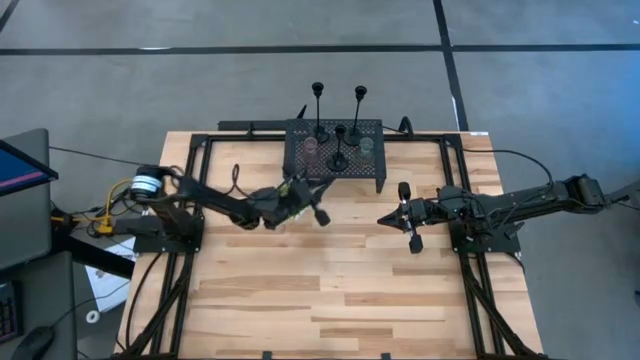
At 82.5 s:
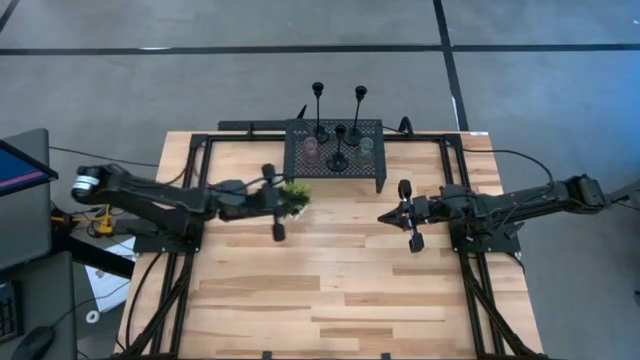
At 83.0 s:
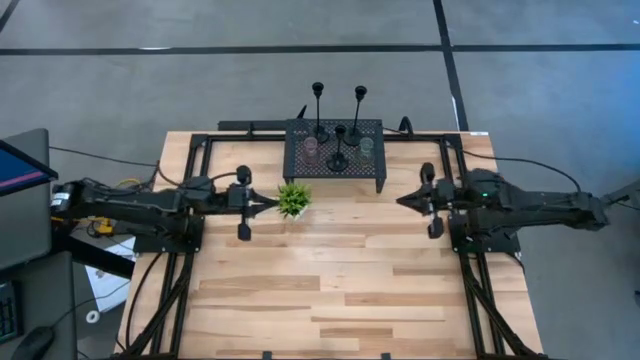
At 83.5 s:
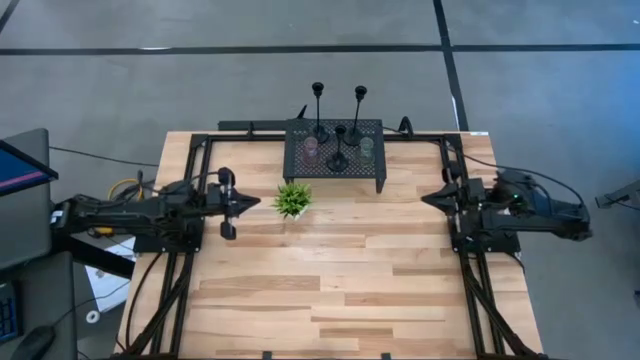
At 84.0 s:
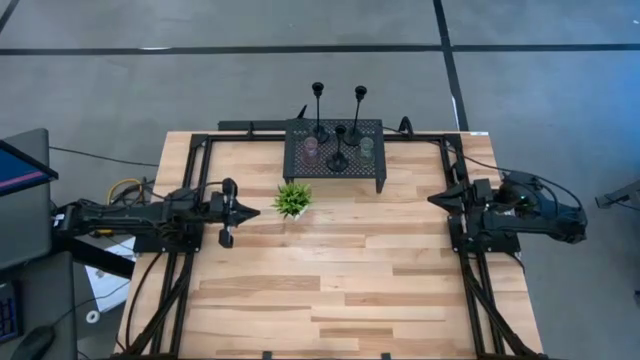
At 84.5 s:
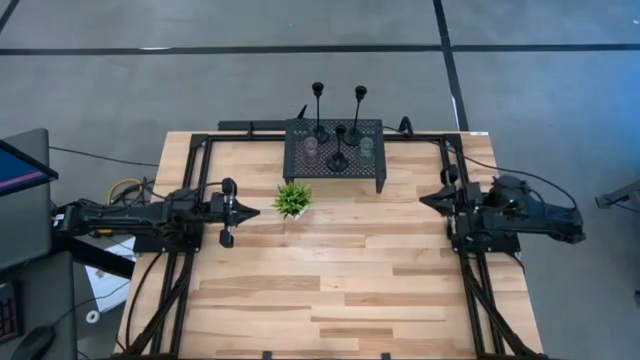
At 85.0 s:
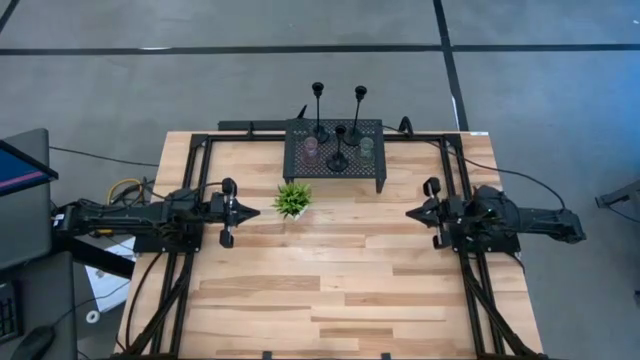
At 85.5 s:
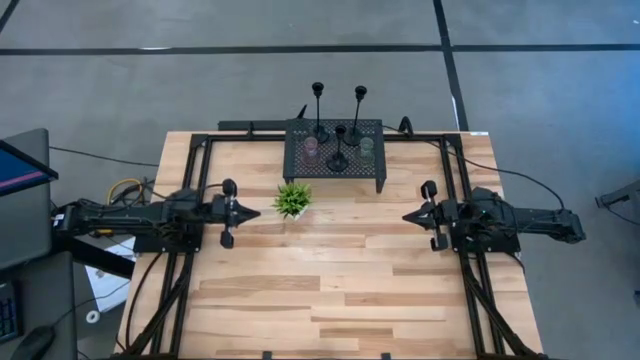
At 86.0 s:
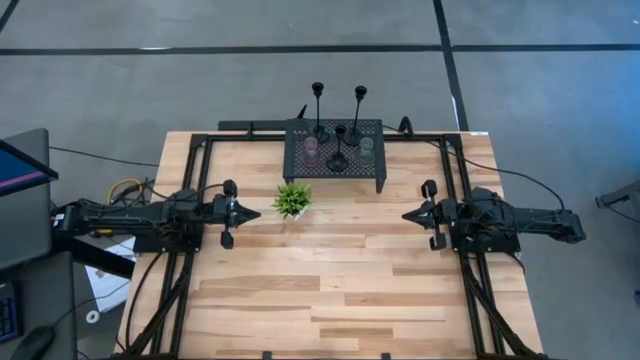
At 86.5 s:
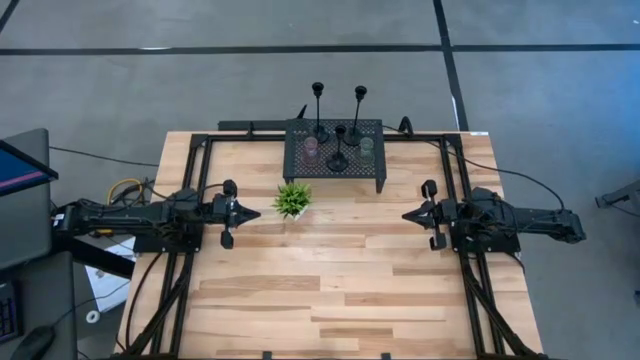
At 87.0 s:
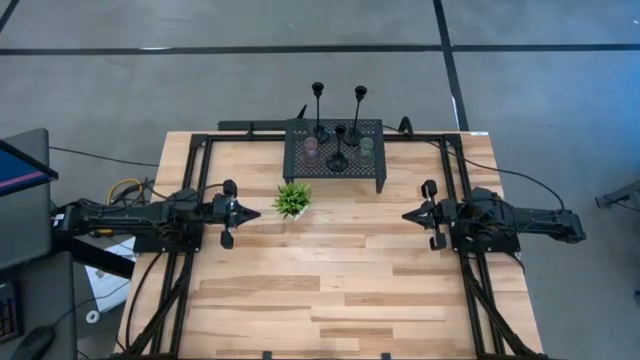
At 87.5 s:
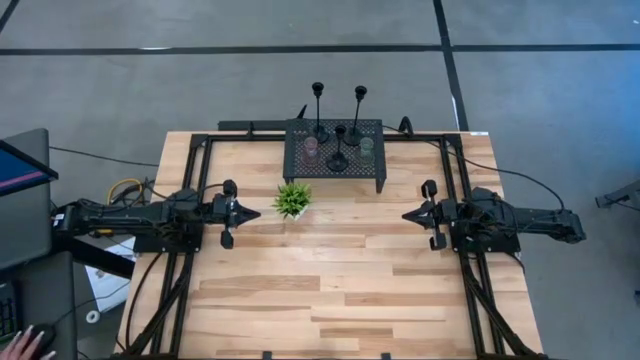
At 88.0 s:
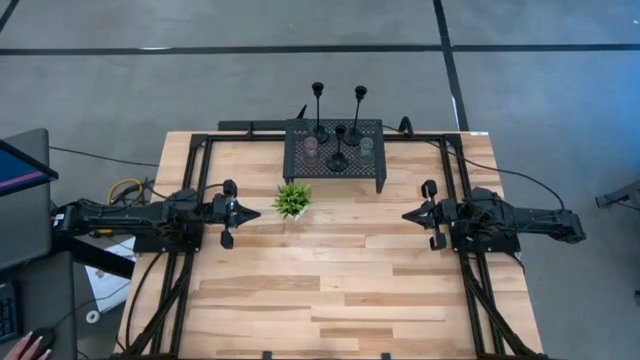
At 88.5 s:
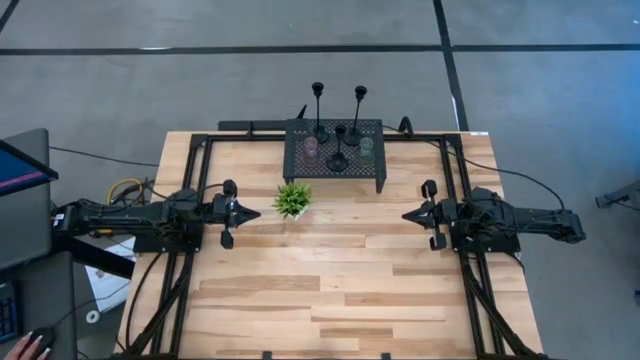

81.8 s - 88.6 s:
Task: Pick & Place candle stick holders
Return to Home Position

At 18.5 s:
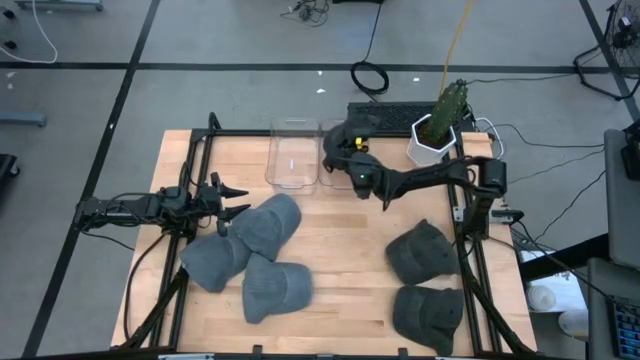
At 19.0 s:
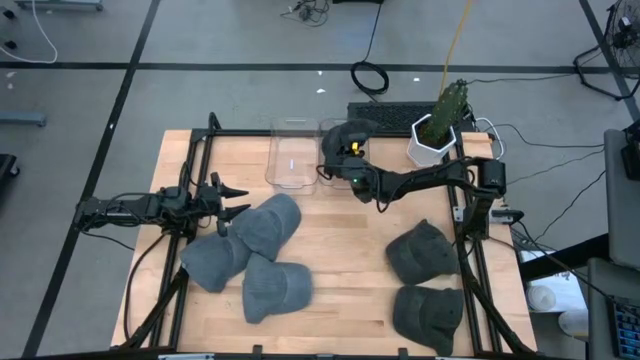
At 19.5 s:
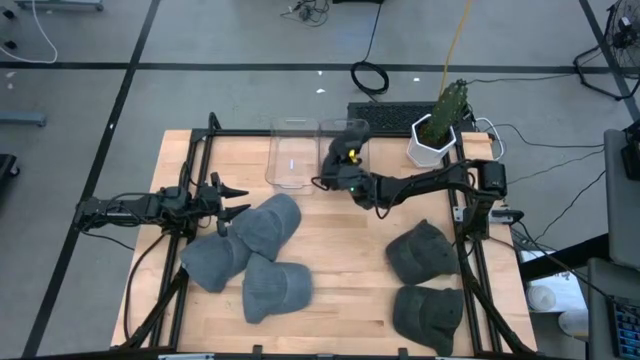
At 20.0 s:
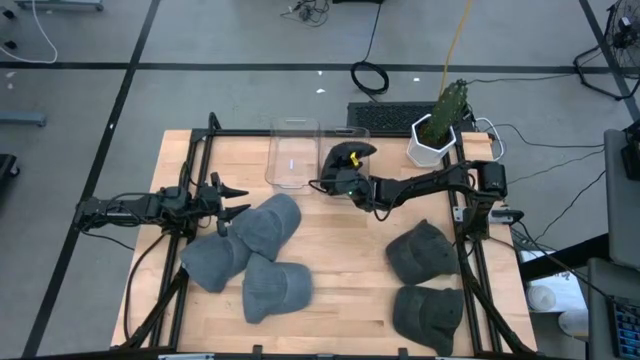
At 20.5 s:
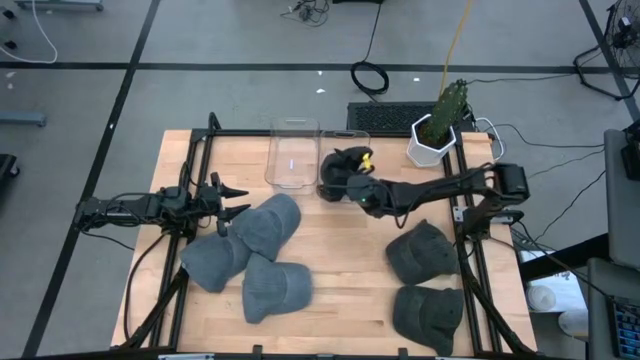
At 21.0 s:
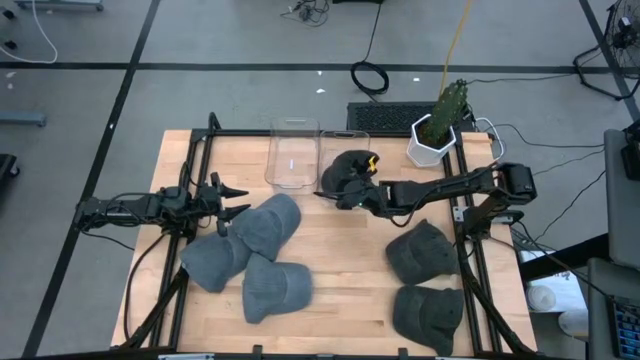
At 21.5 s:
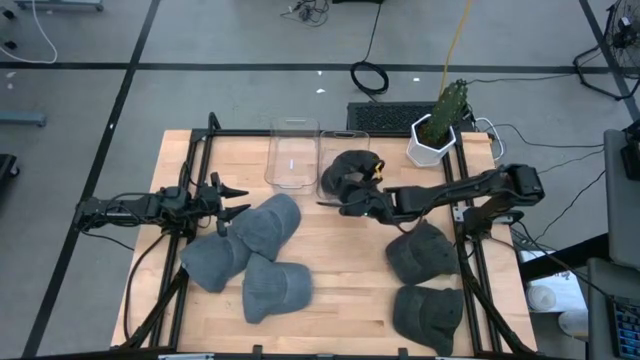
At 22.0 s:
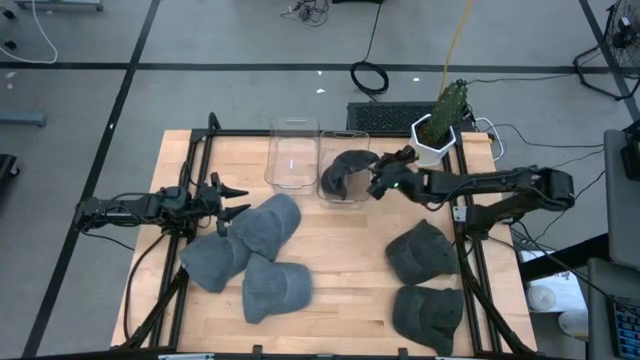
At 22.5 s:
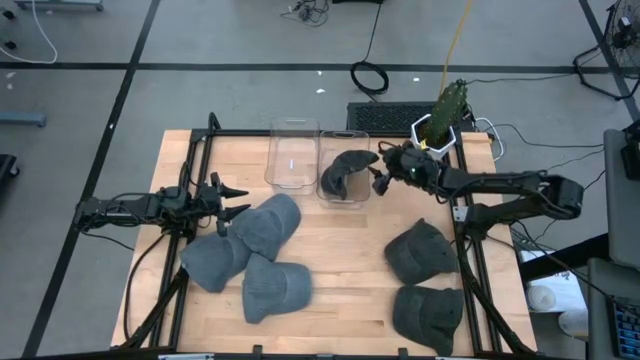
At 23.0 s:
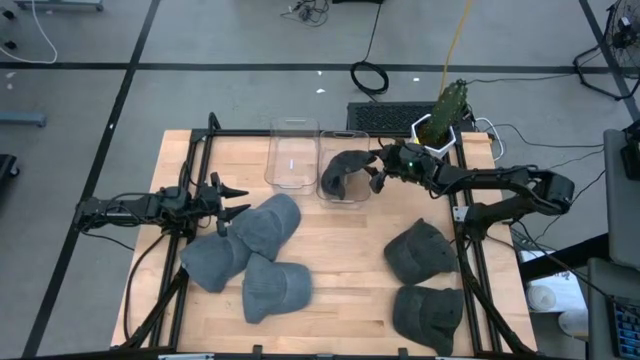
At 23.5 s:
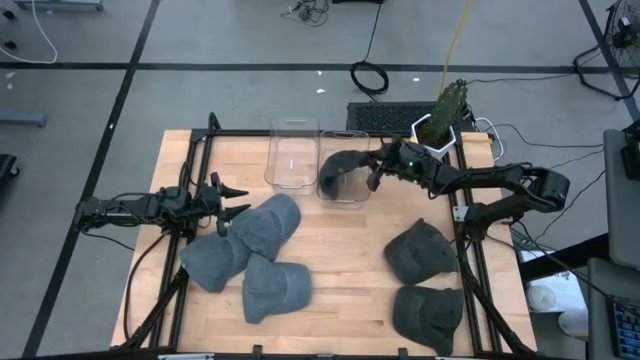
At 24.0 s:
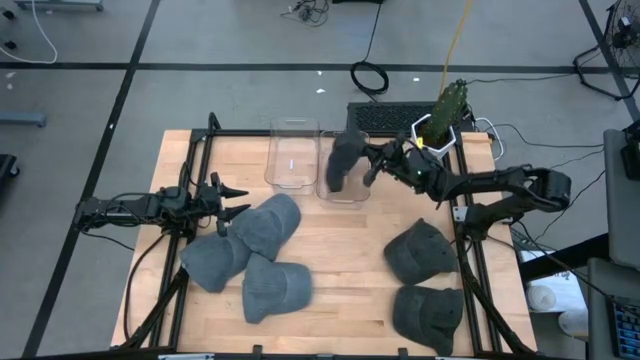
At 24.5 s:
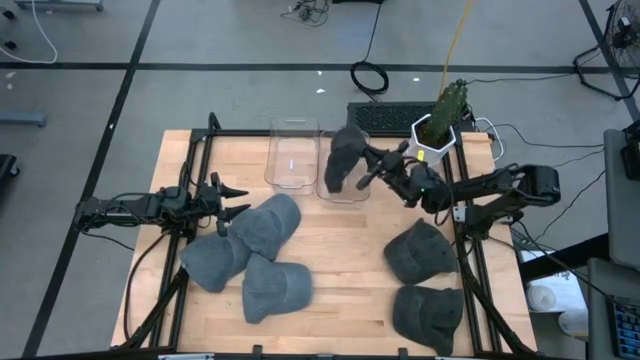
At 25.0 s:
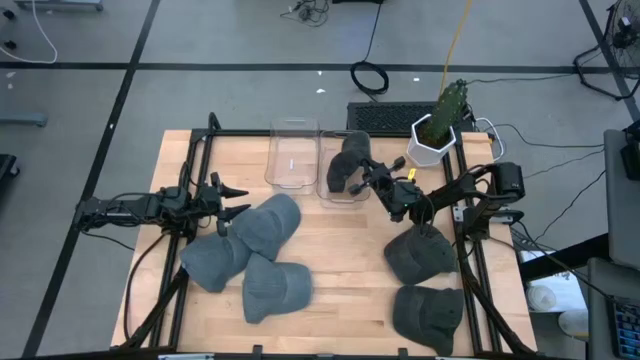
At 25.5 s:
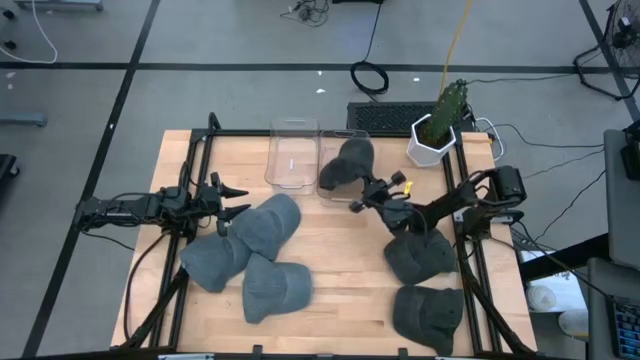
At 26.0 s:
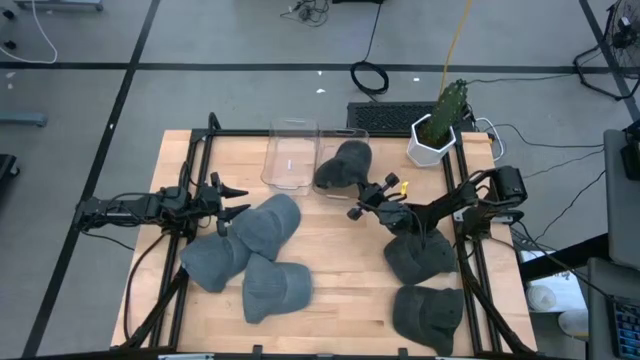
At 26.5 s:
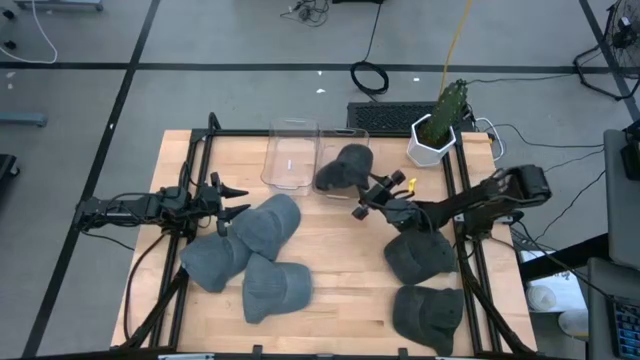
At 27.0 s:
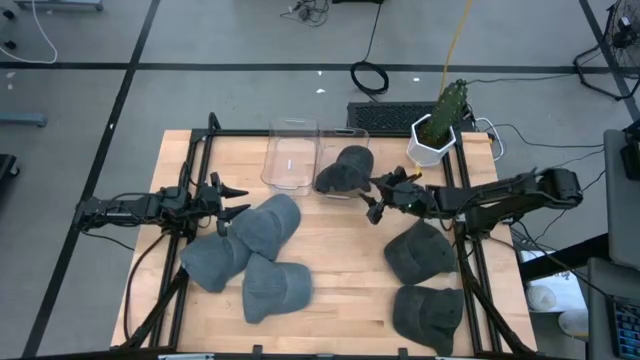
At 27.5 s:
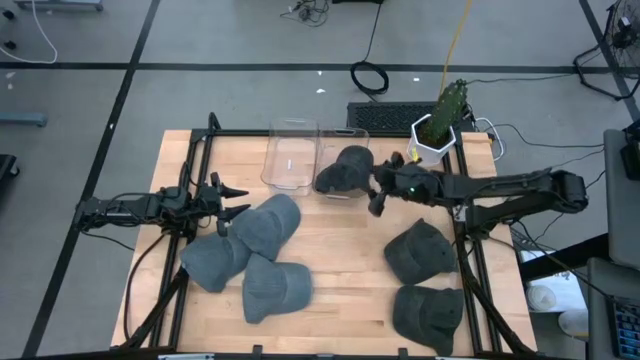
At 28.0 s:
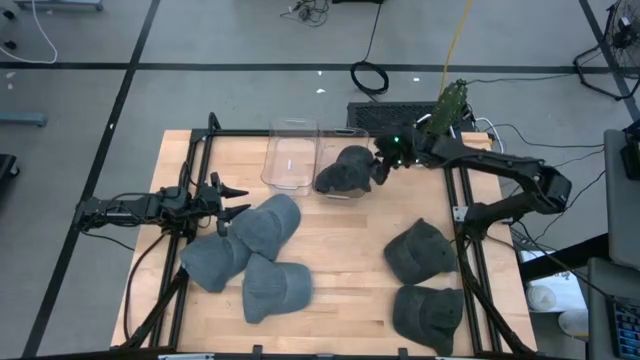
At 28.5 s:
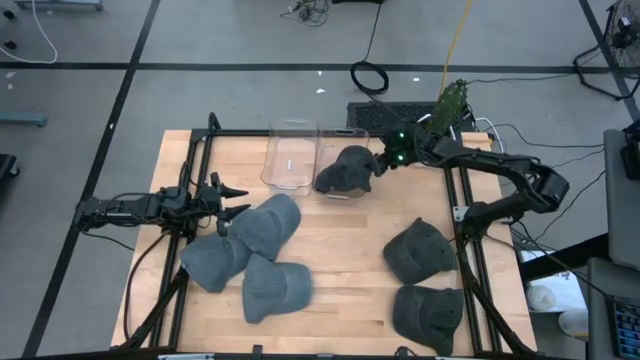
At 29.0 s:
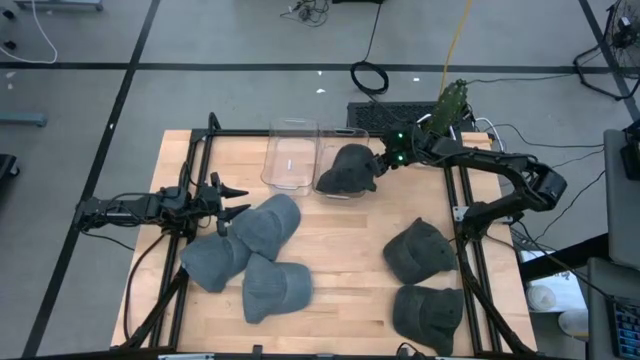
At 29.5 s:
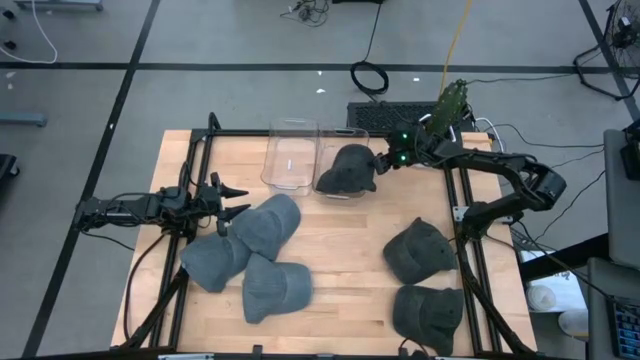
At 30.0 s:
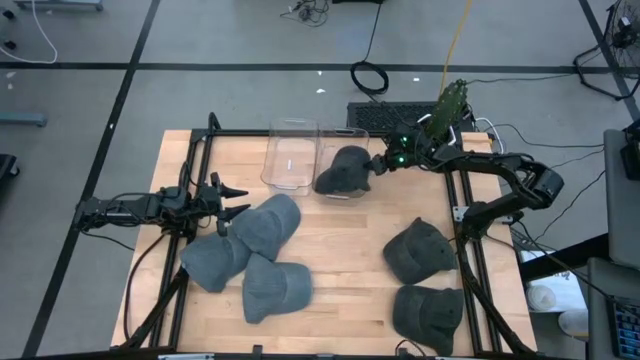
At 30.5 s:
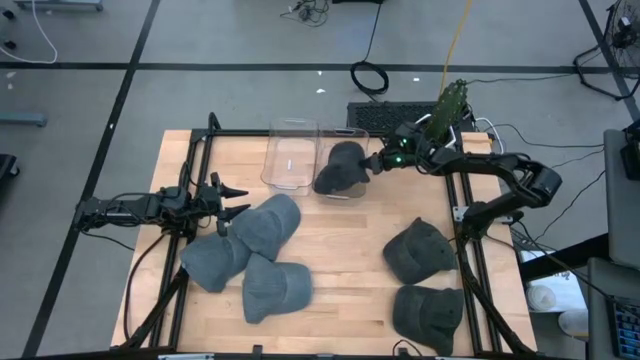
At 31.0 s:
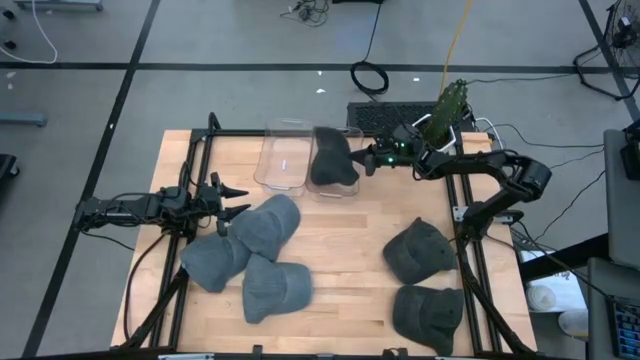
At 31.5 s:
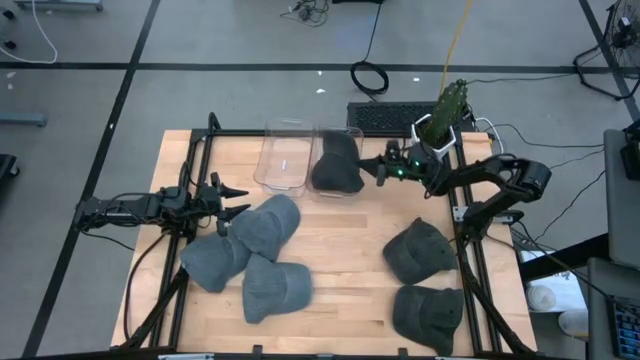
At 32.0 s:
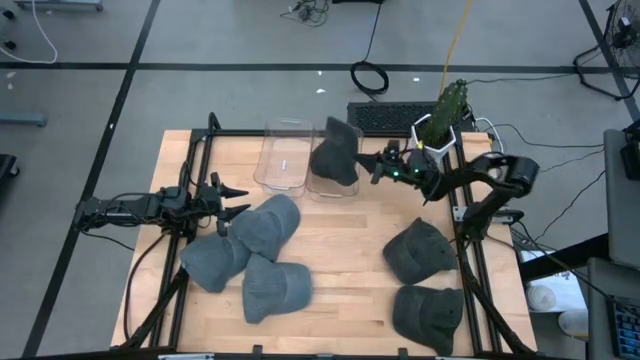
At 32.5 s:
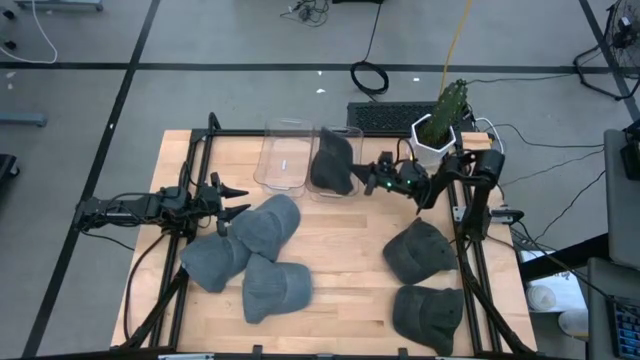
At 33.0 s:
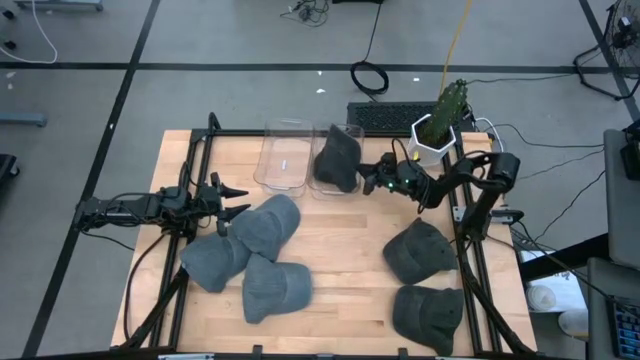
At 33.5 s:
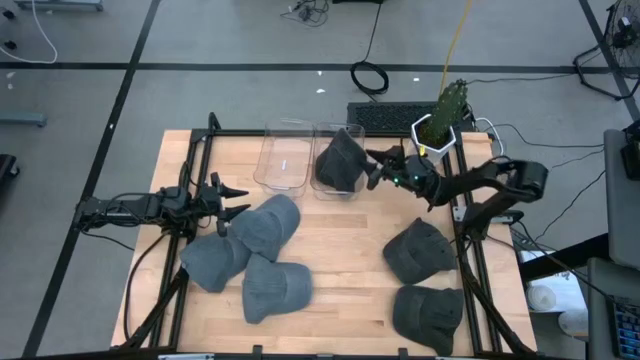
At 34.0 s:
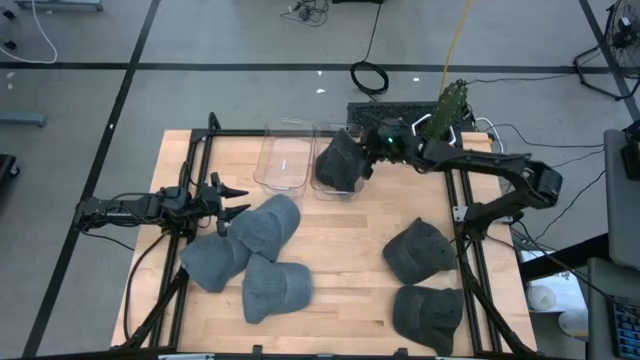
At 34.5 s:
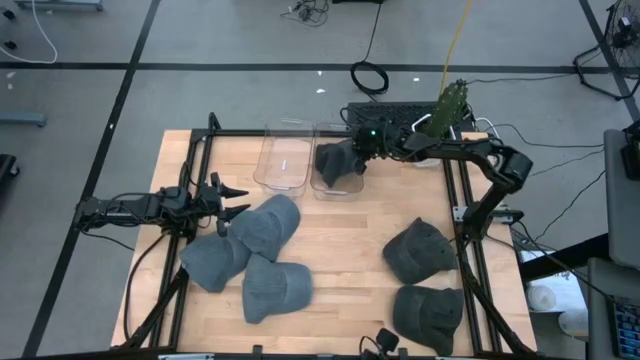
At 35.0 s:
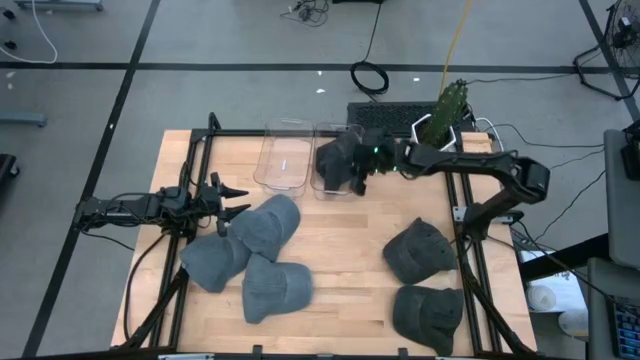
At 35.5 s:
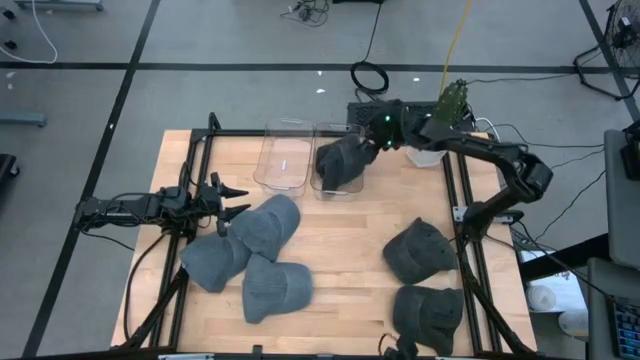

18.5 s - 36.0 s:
Task: Pick & Place hat
Put the top black cap into the left transparent bin
